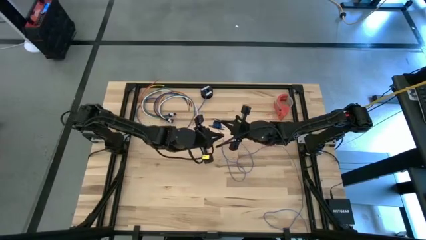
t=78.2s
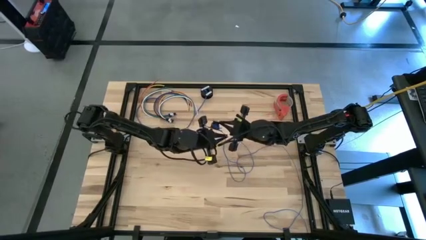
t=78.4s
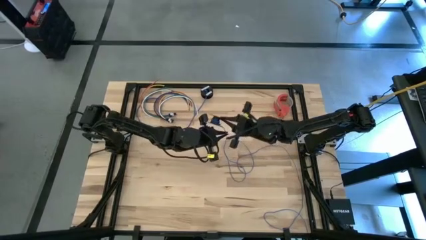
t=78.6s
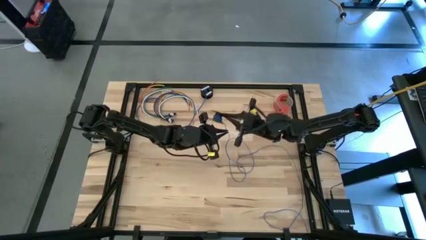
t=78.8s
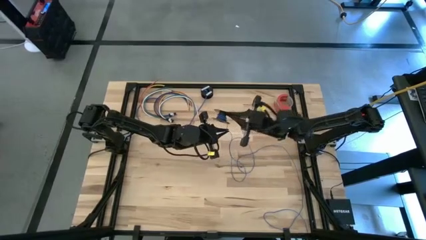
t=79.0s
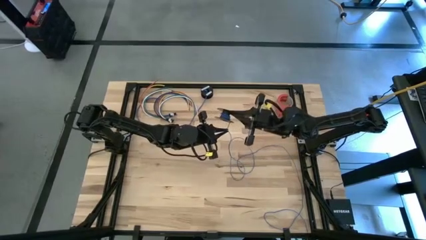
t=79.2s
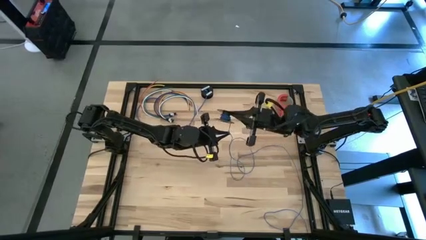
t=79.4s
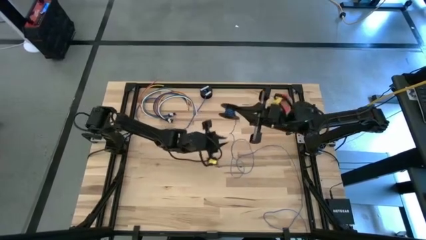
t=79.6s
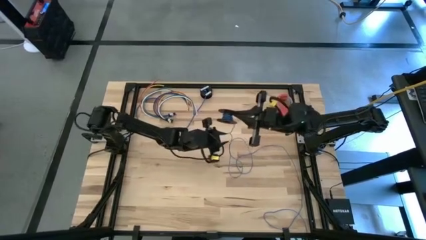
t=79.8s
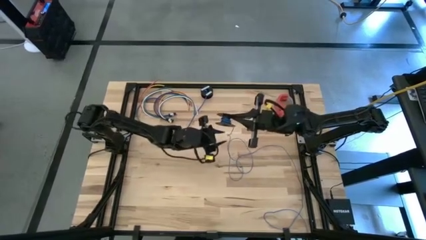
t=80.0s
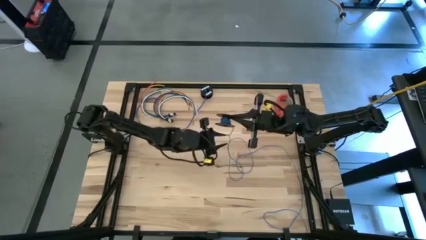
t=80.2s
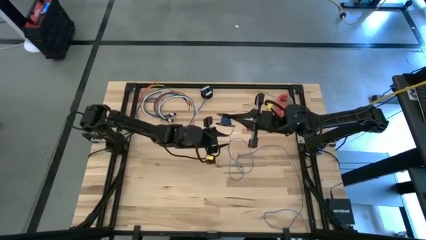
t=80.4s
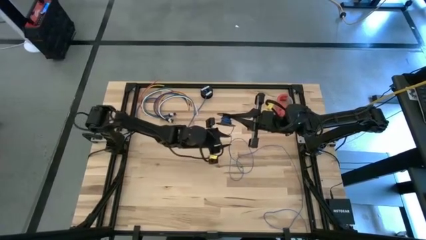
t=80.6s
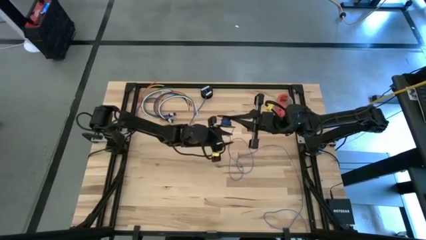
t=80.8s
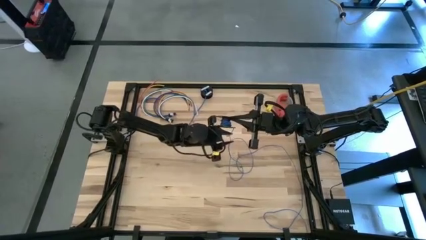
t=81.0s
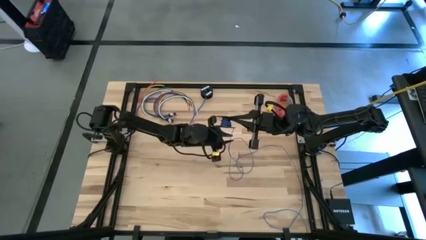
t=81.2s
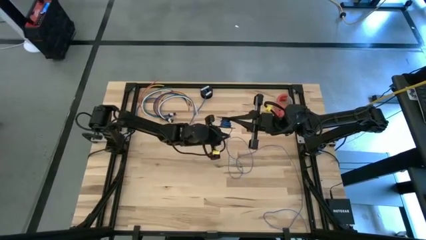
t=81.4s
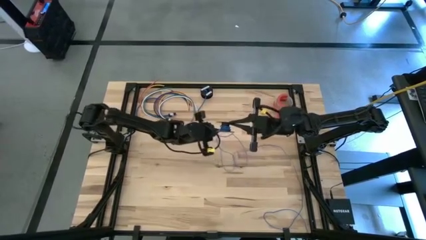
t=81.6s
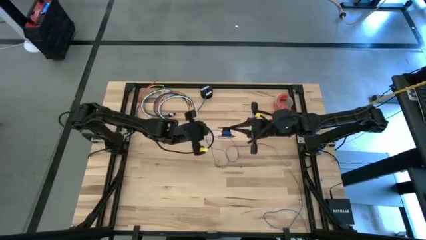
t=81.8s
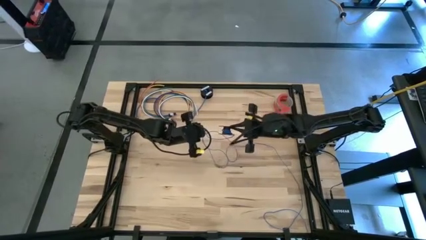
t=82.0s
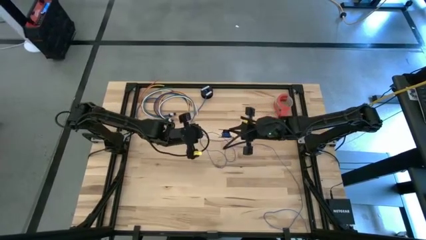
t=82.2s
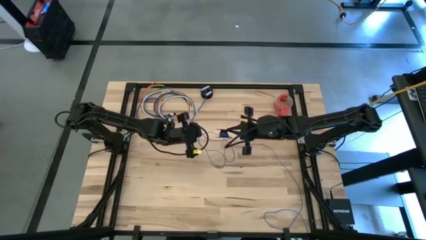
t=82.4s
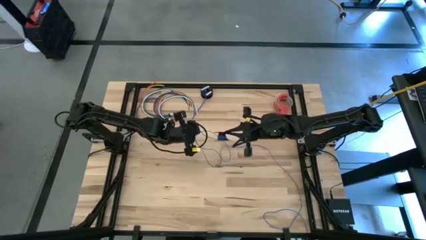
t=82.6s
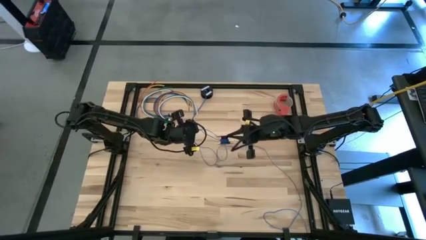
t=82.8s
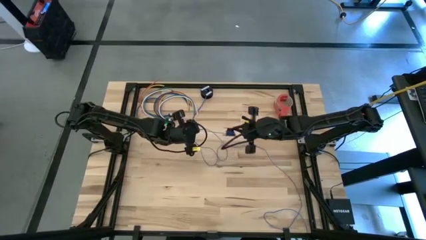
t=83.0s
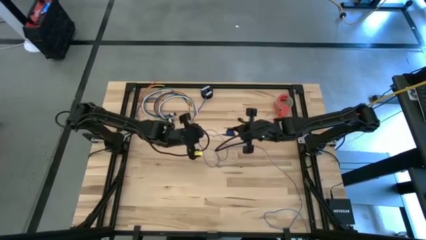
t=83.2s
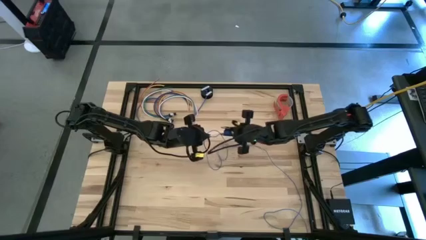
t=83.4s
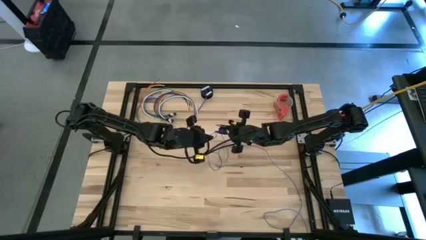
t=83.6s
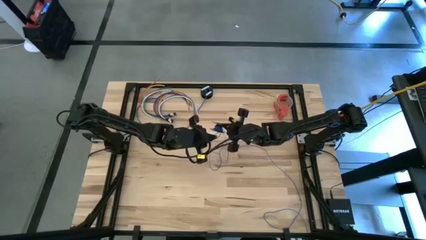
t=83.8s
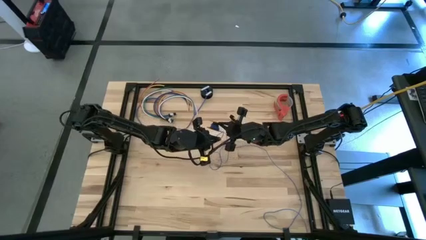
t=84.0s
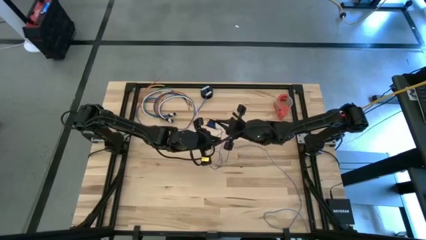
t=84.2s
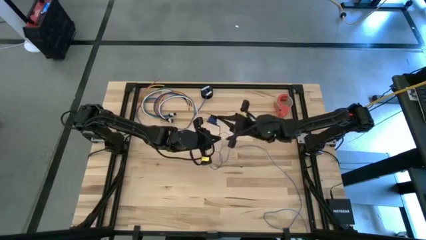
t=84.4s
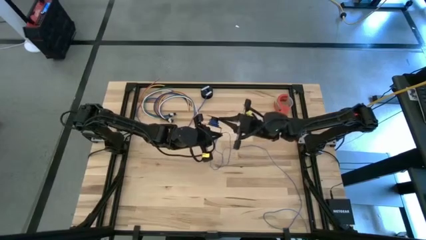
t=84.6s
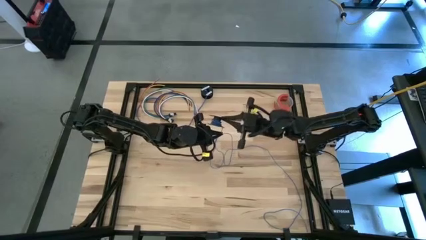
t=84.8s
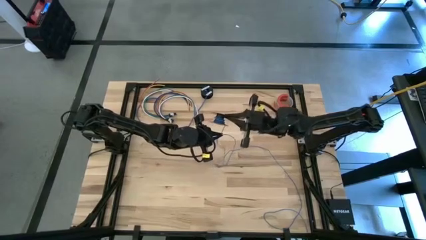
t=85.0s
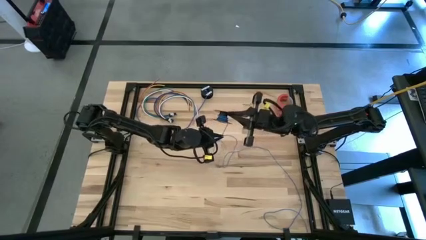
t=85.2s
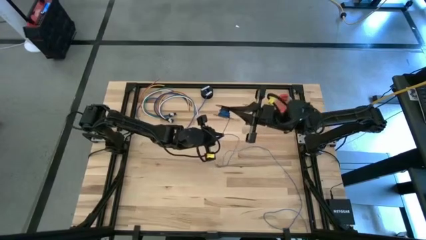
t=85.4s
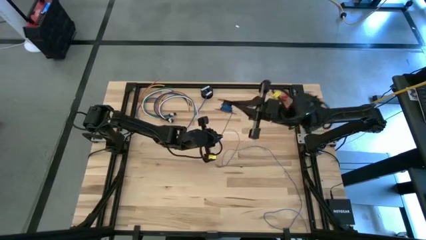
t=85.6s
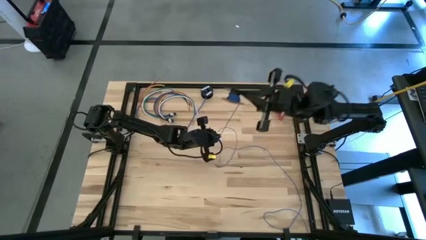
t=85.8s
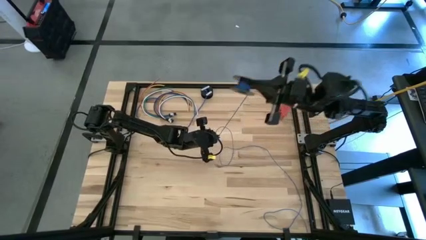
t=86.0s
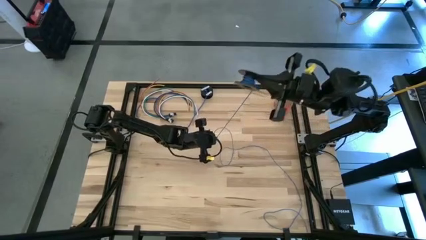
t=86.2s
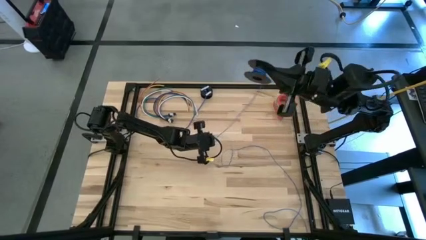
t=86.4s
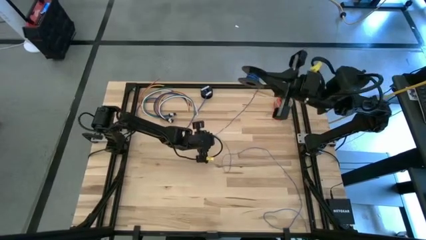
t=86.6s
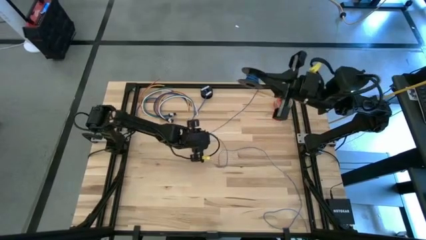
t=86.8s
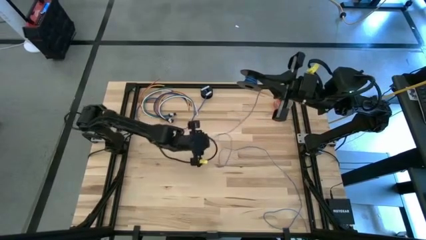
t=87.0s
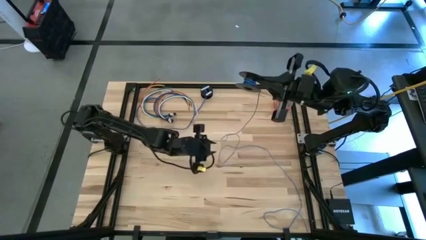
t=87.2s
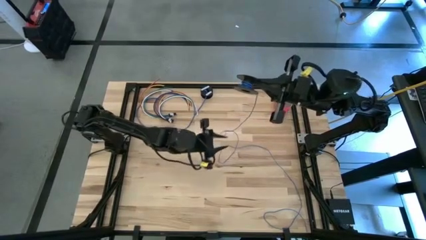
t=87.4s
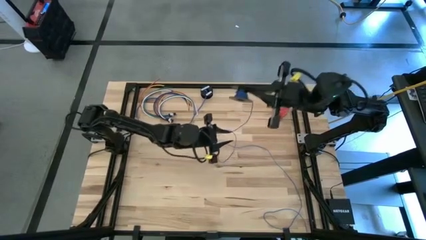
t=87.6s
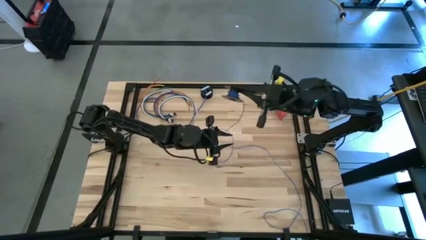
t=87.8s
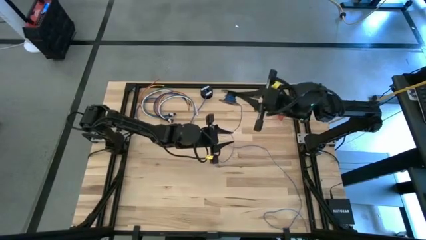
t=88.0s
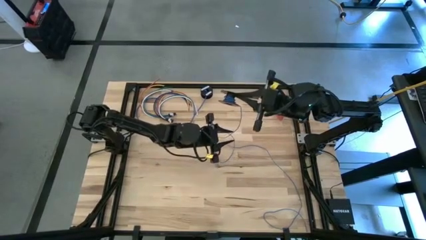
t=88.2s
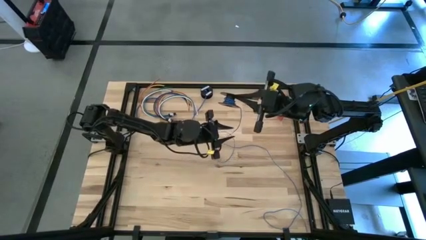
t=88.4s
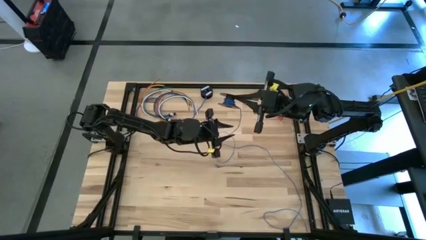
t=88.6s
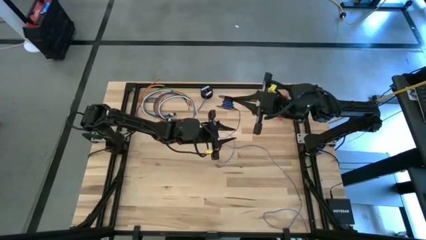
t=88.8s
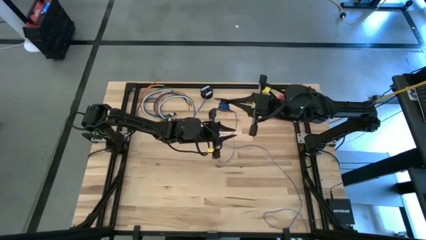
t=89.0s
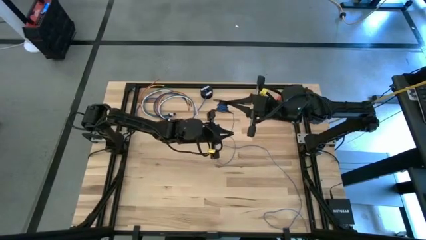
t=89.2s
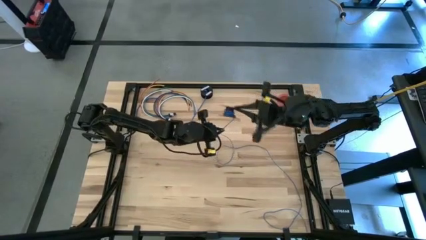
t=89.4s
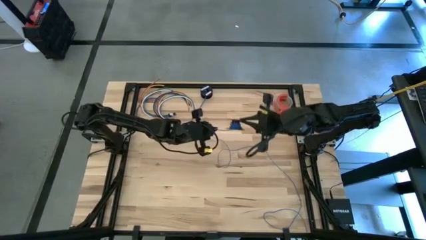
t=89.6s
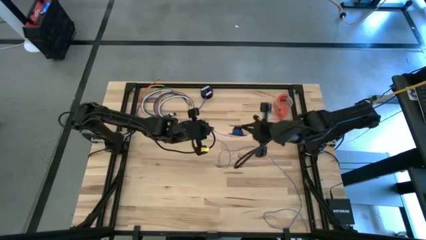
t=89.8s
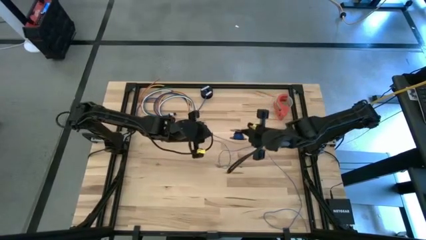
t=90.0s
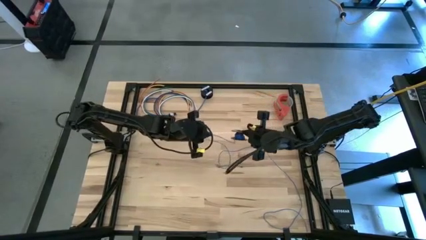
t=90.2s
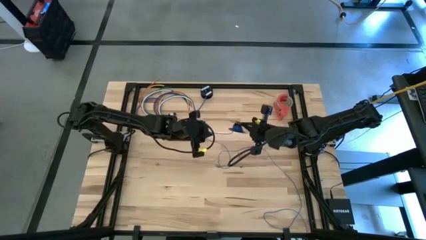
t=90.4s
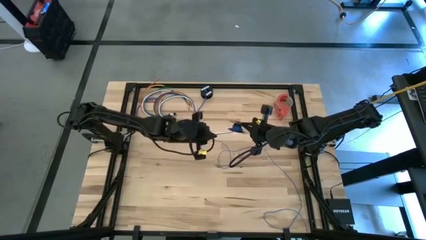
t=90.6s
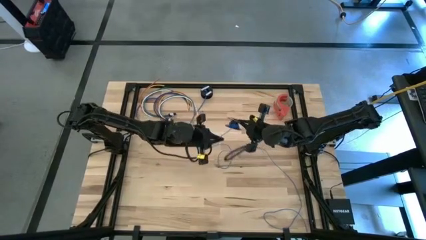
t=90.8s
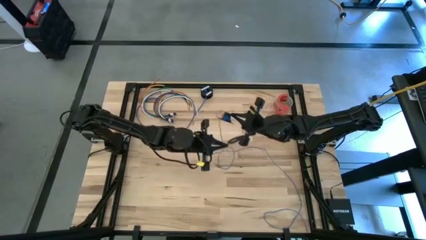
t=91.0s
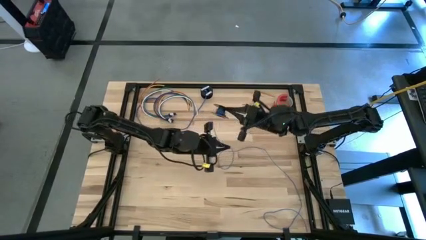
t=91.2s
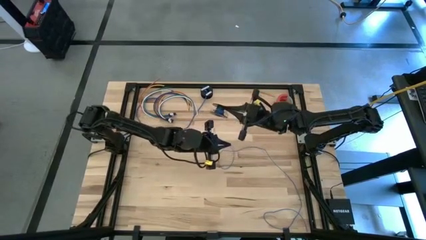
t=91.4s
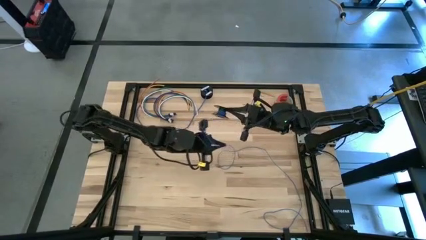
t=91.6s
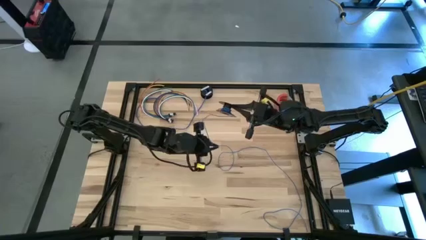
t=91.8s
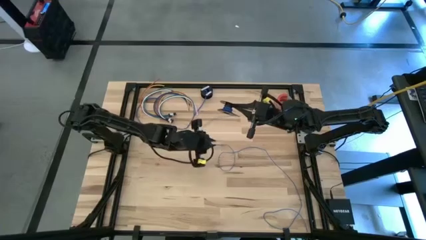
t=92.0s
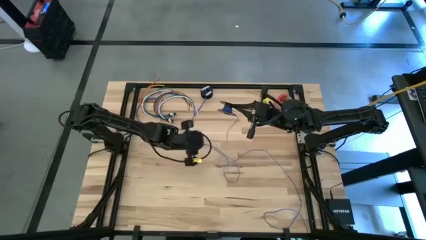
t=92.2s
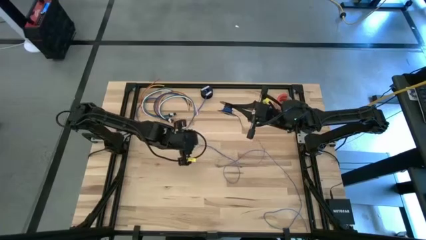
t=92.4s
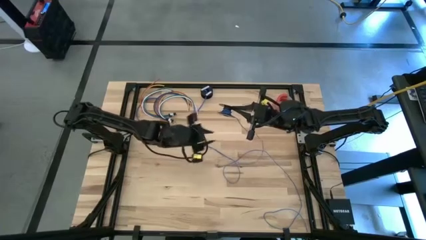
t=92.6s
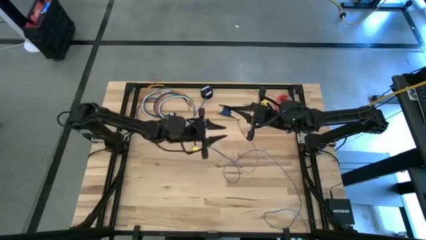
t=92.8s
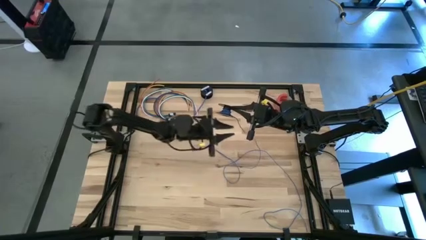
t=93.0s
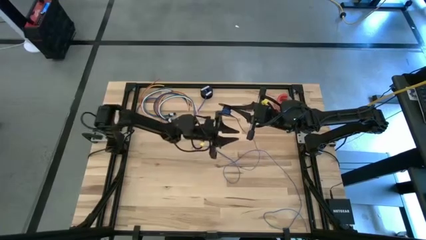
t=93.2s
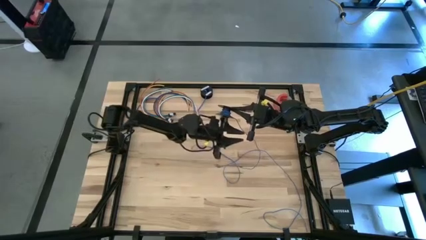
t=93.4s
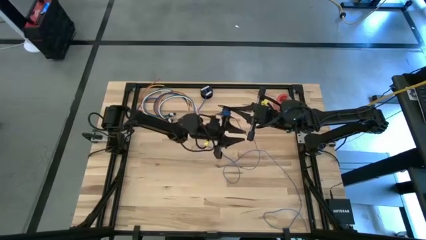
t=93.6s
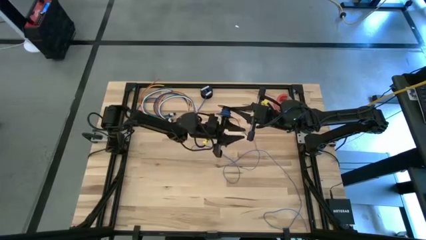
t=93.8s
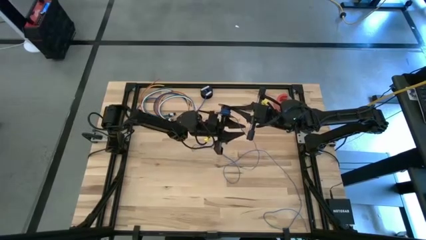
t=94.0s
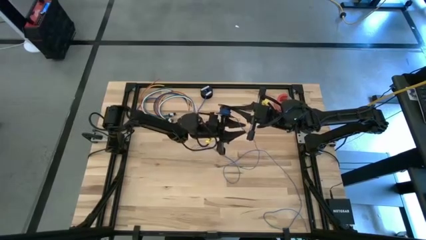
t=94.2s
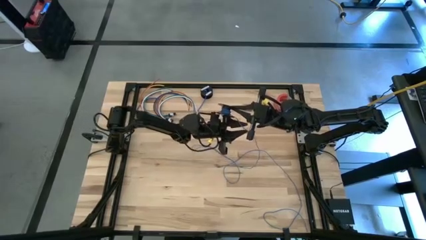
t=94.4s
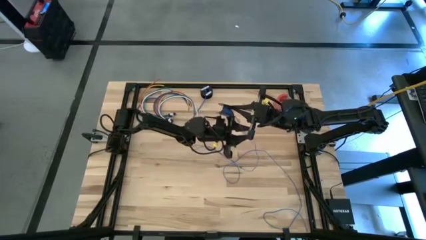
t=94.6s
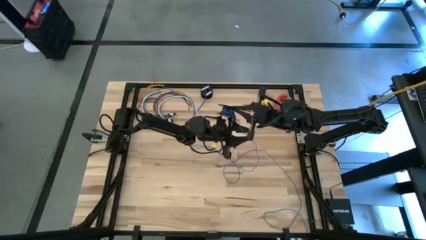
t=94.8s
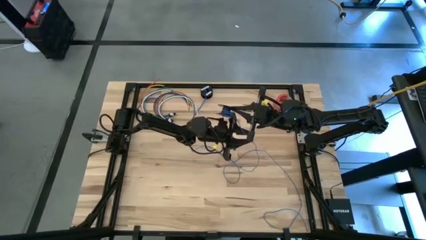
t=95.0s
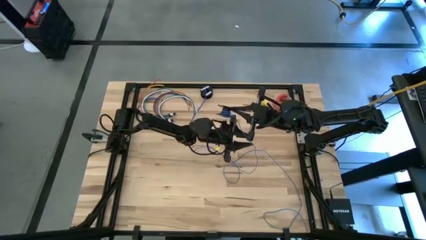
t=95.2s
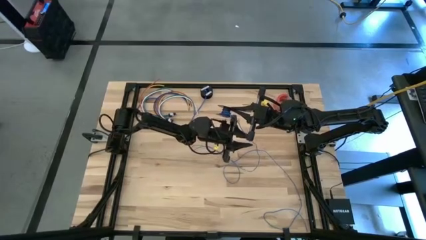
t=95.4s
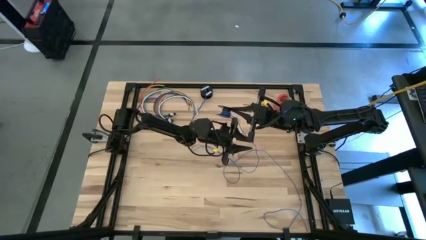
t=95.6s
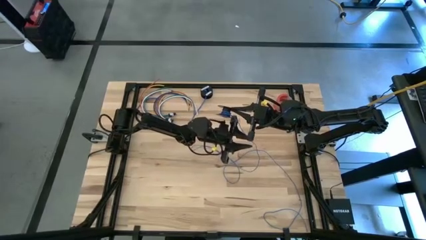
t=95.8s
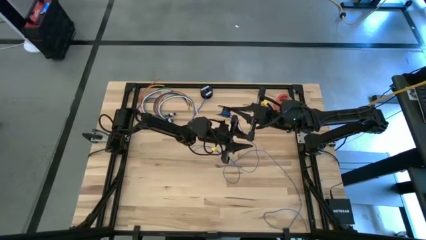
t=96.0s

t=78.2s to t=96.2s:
Task: Coil cords
Coil the blue wire onto the black spool
